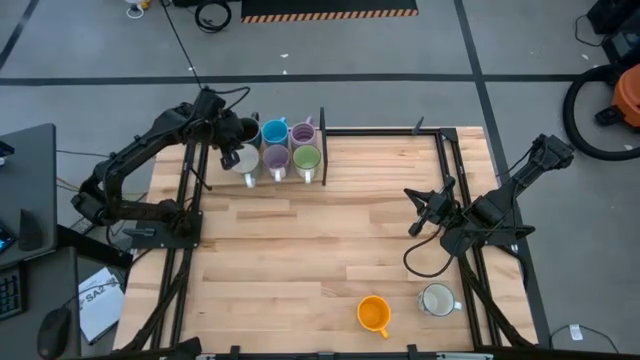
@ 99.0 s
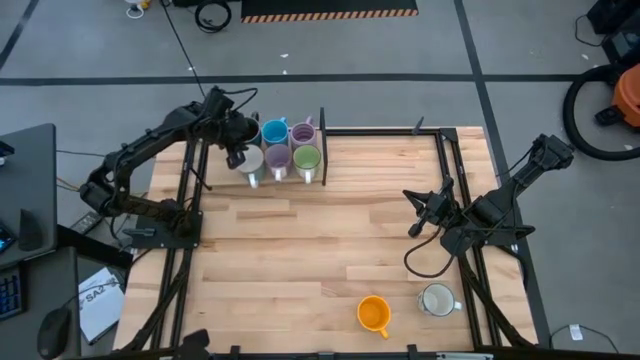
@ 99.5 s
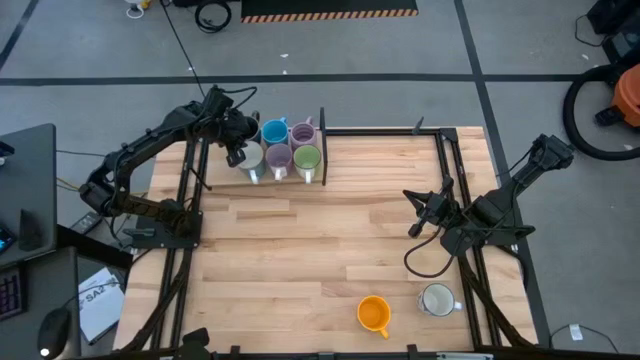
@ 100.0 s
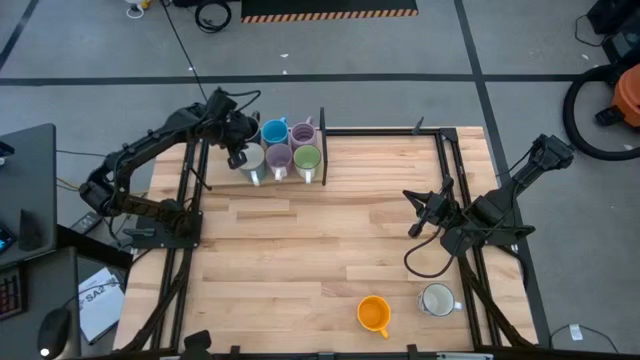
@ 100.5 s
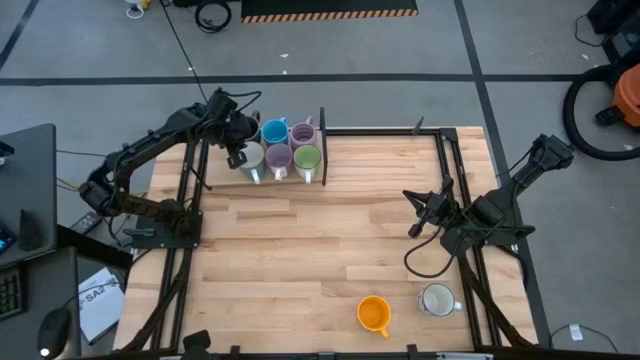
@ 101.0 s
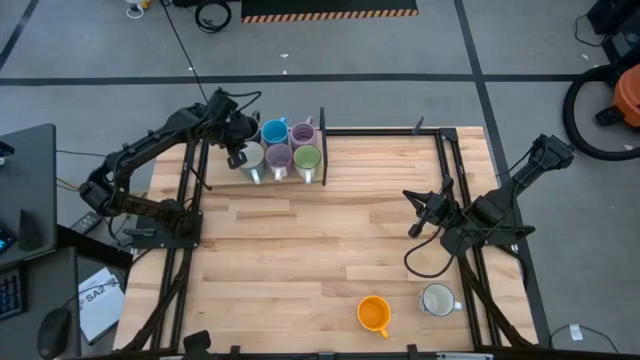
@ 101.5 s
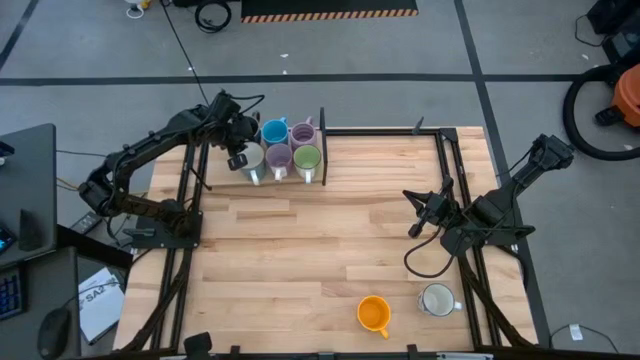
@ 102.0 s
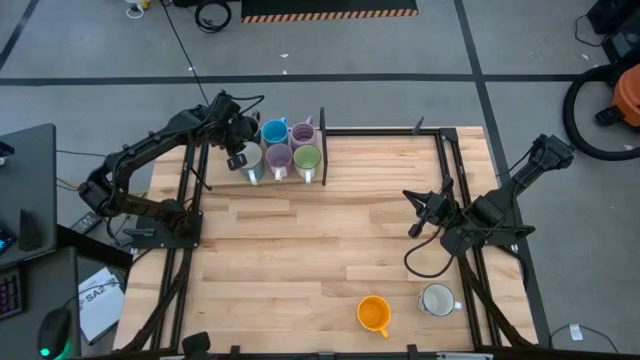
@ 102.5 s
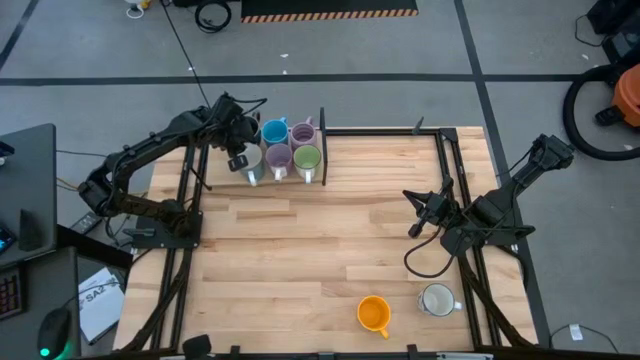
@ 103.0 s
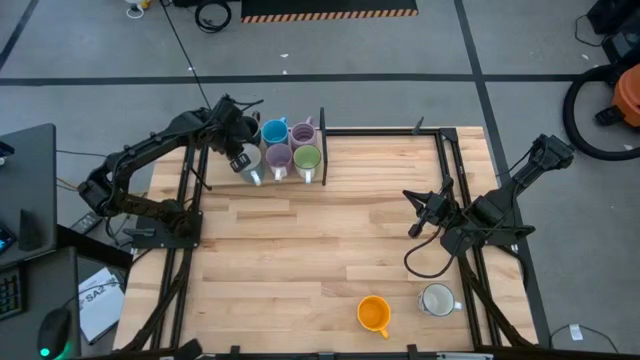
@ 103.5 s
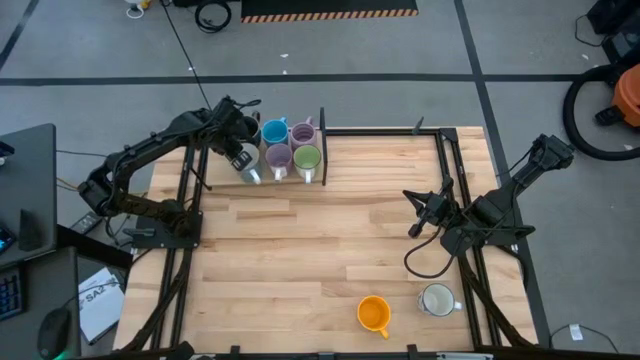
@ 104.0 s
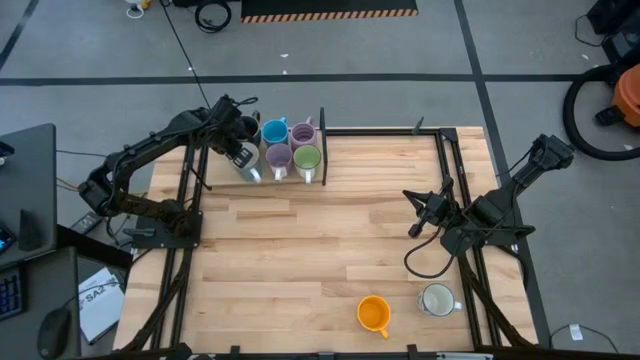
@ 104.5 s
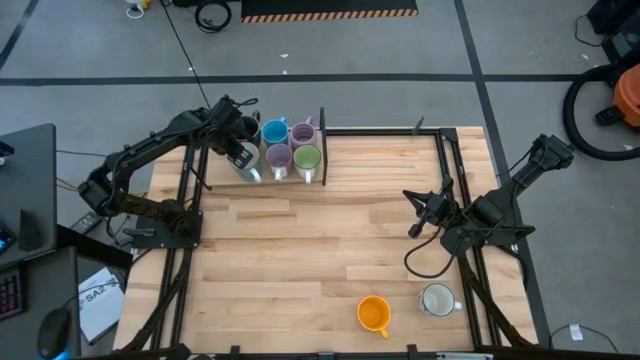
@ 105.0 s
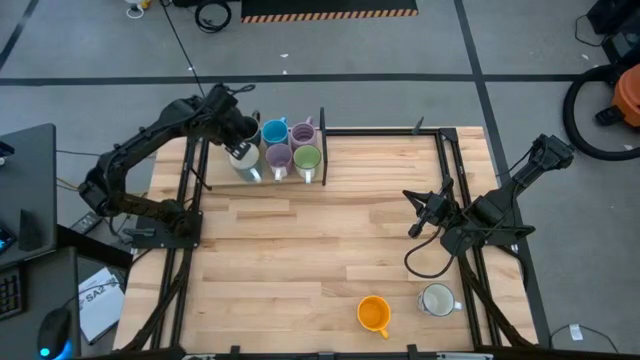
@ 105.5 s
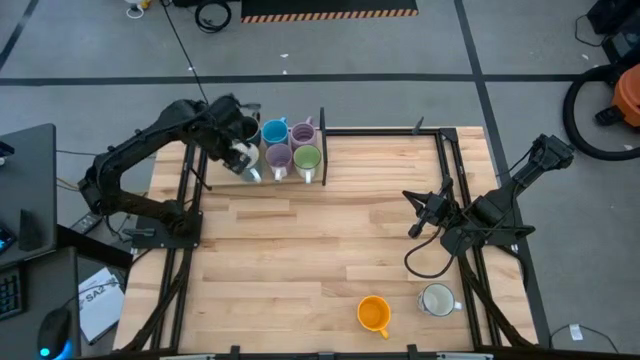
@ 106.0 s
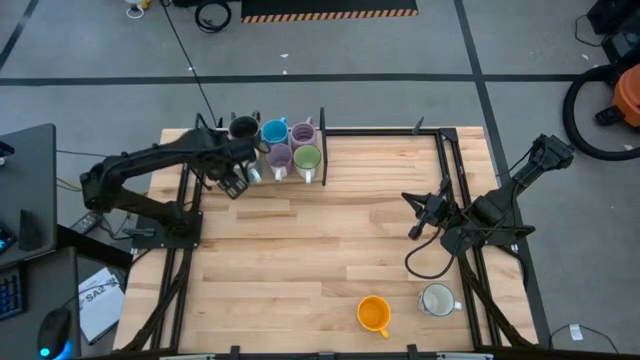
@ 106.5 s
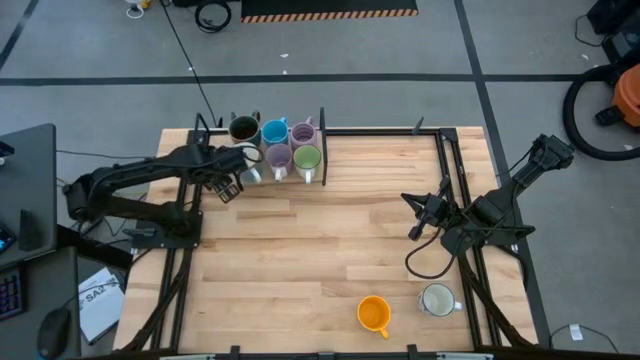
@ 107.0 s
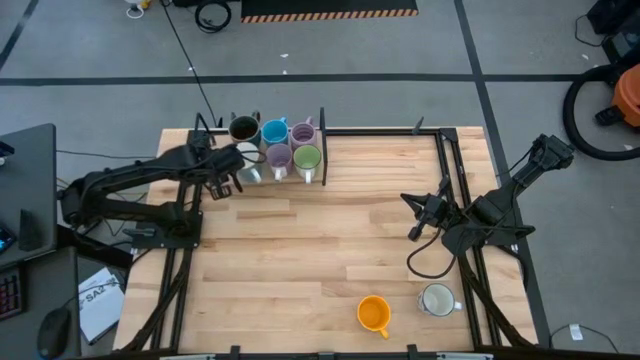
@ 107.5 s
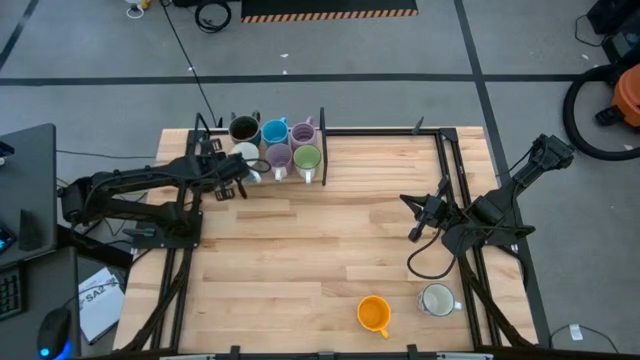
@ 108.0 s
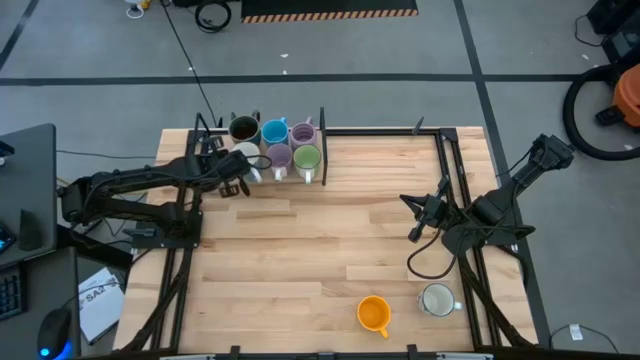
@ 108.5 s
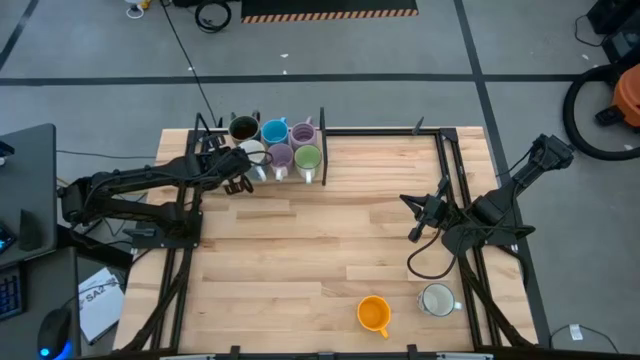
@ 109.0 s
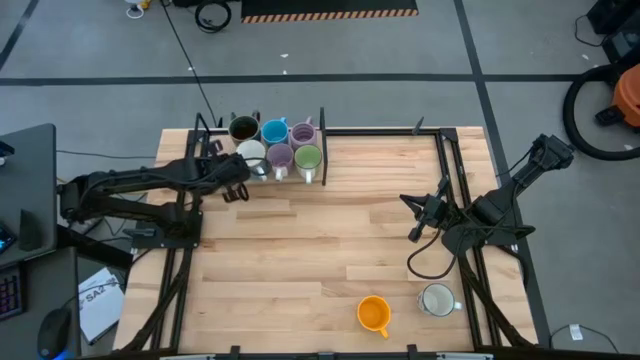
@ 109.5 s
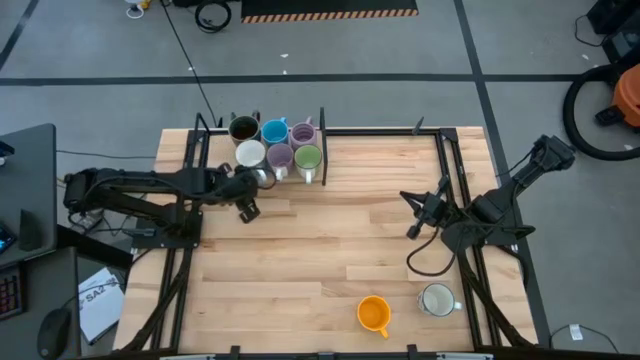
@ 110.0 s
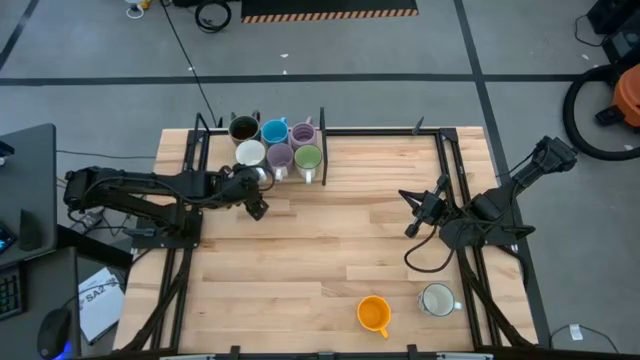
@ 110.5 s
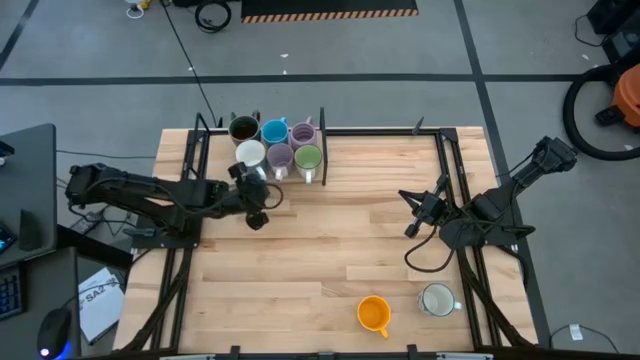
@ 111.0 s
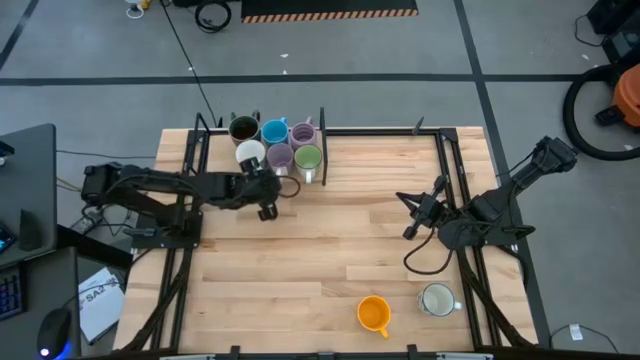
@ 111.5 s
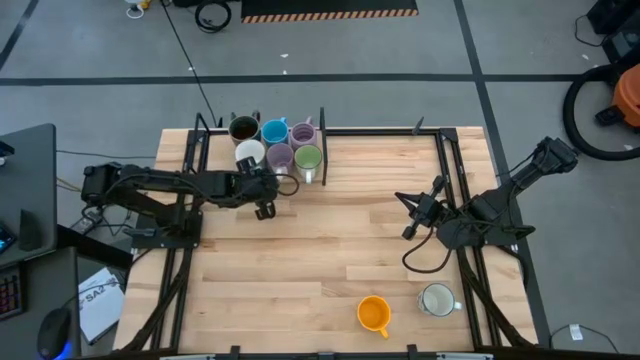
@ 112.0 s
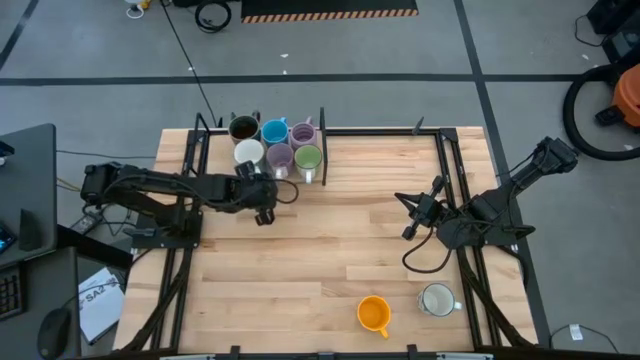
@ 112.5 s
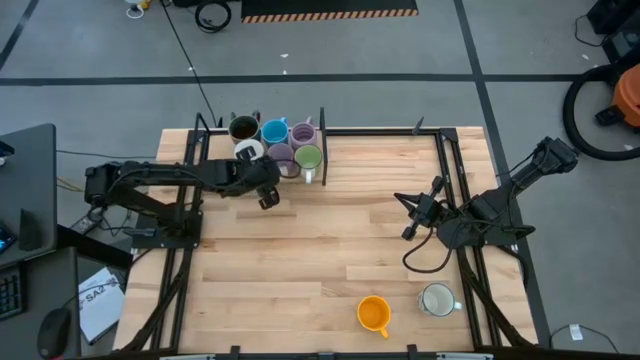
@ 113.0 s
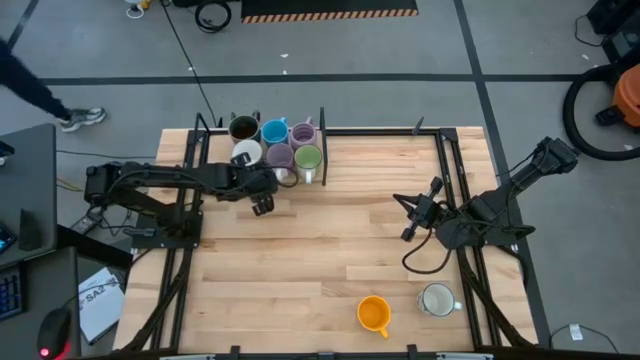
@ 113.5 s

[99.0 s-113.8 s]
Task: Place coffee mugs
Put the light blue mug on the shelf

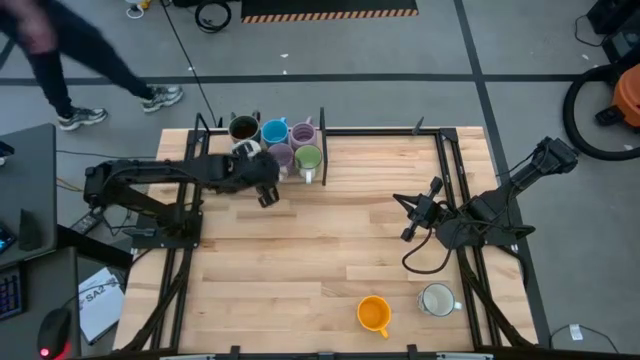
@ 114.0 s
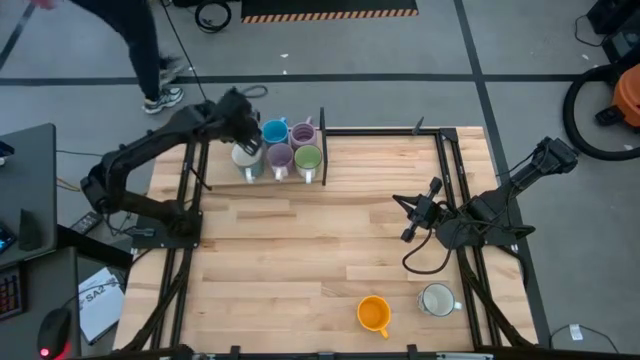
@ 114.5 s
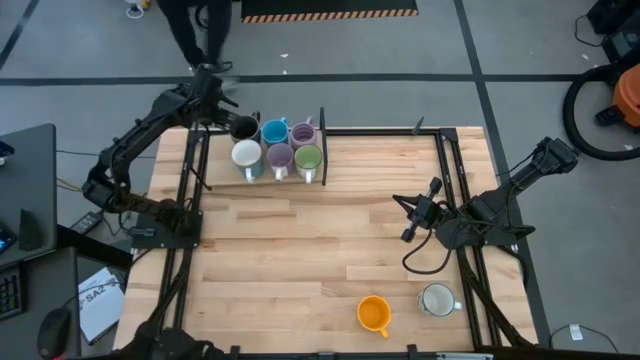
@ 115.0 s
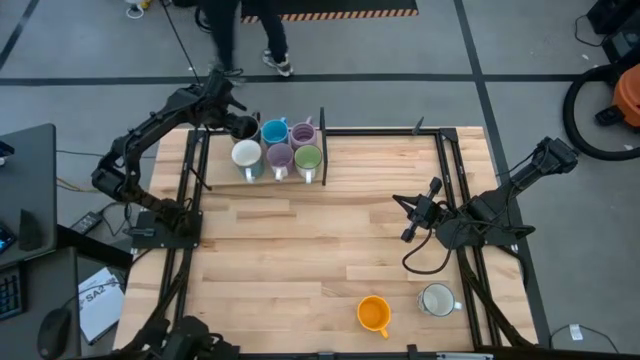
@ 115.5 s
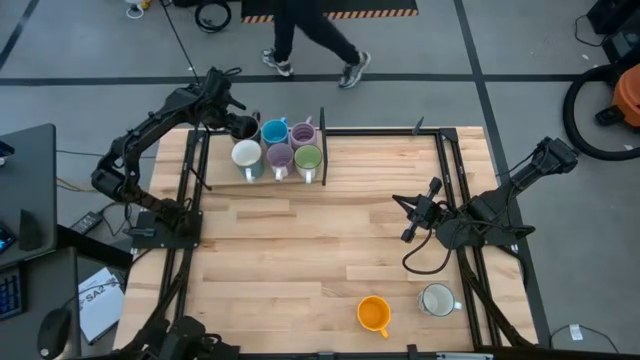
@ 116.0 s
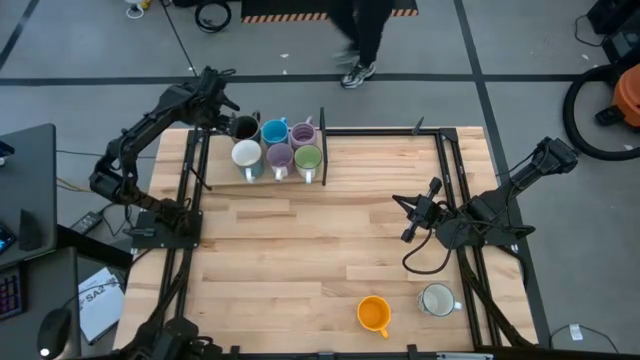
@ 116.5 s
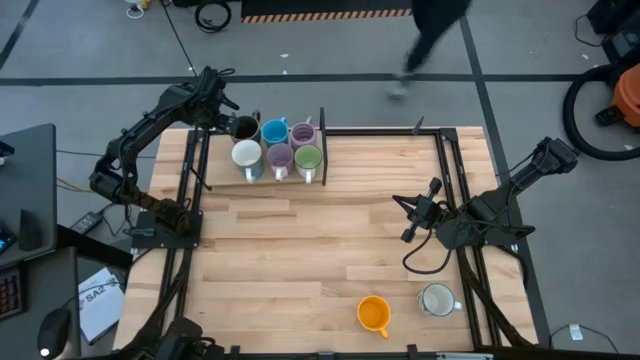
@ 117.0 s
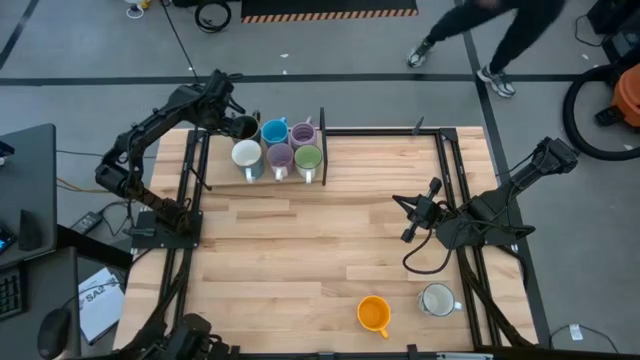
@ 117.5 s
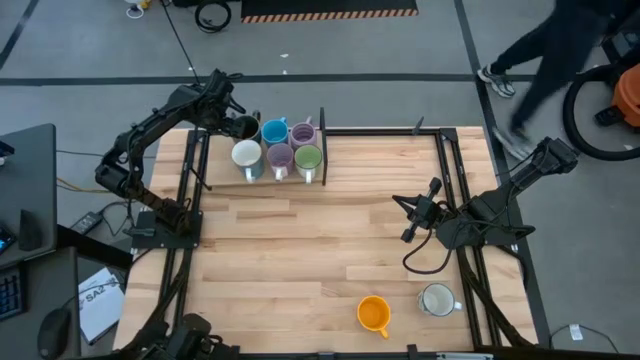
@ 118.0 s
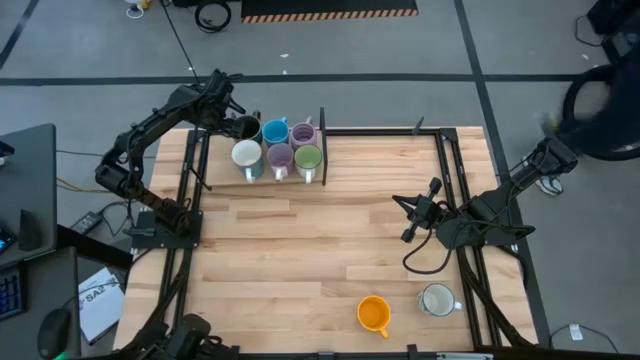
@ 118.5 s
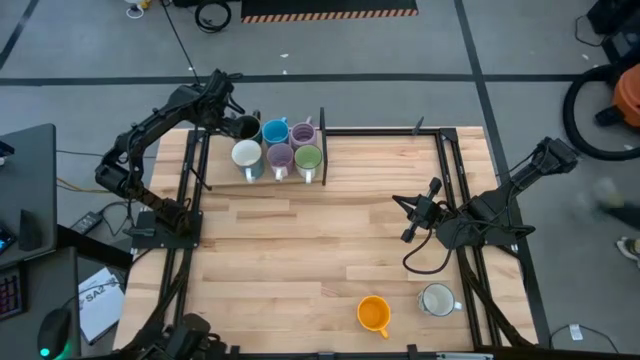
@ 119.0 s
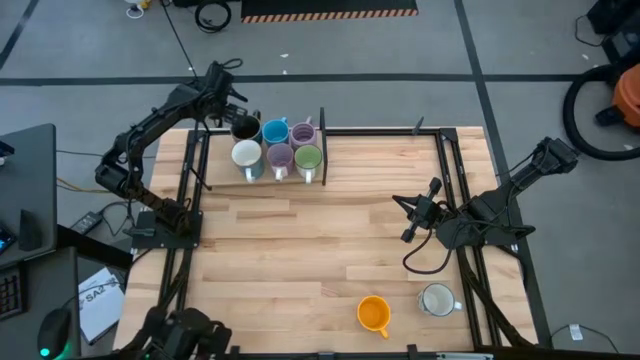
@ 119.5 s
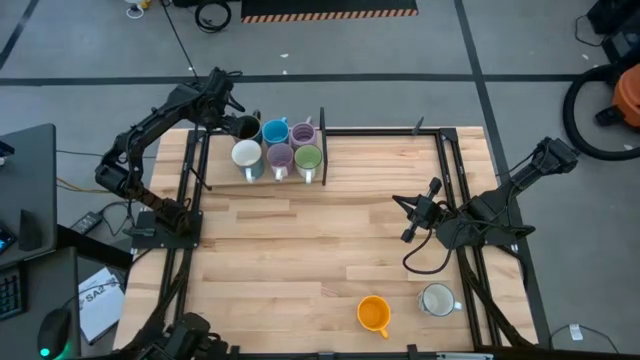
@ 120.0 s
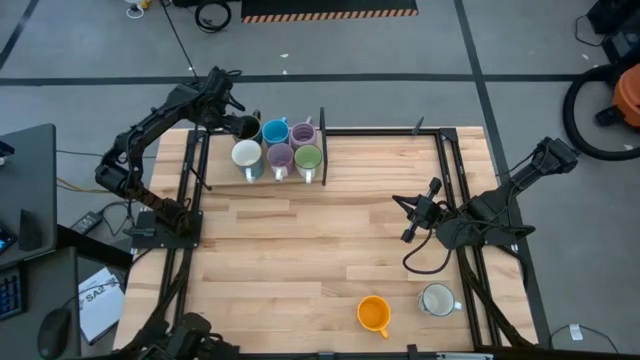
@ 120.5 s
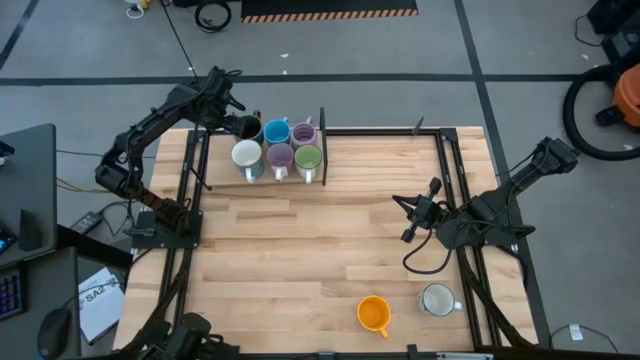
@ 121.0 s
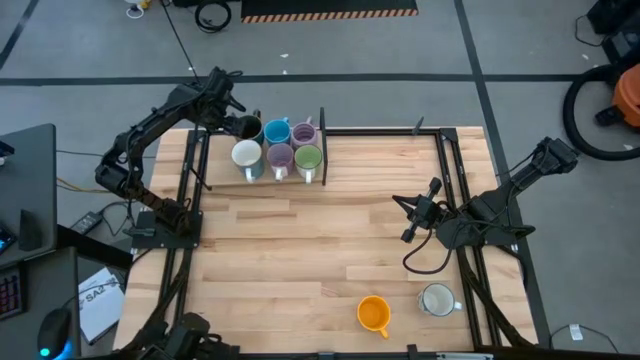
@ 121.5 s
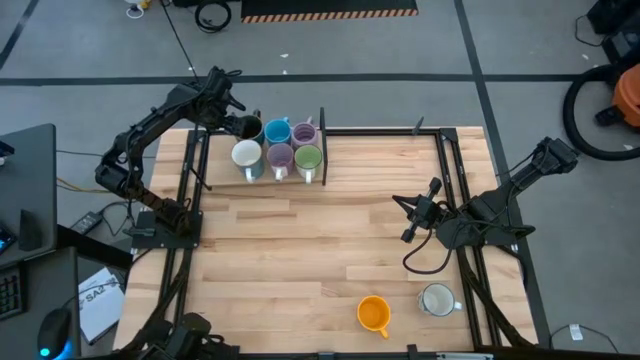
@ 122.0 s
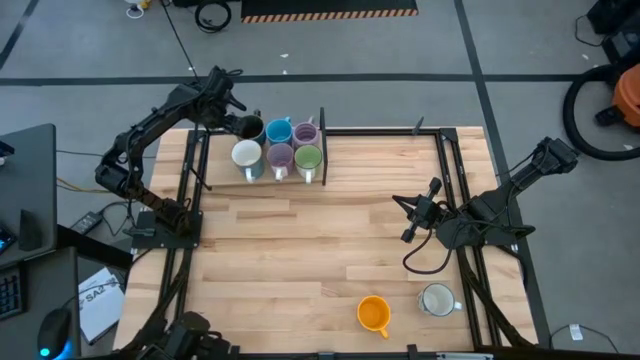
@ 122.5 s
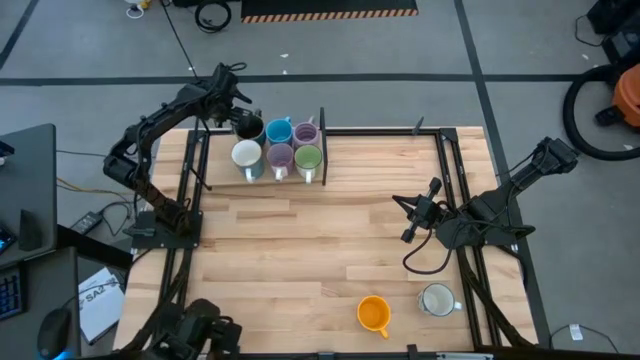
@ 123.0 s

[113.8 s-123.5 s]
Adjust the dark blue patterned mug on the shelf
